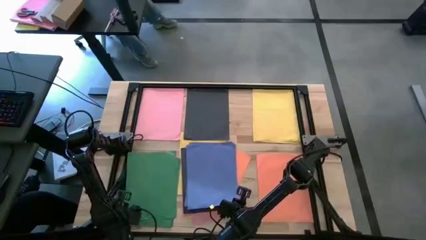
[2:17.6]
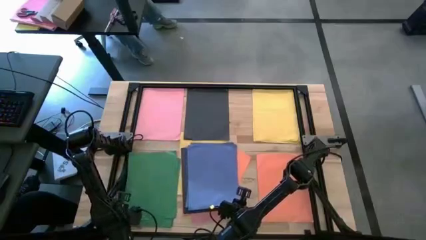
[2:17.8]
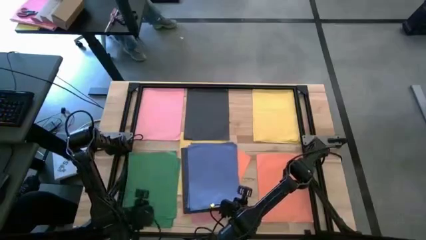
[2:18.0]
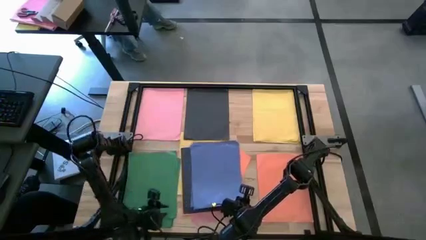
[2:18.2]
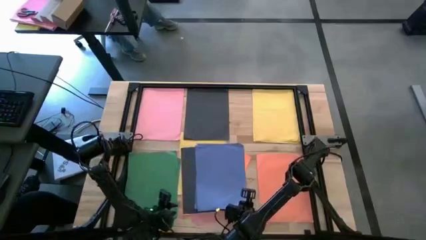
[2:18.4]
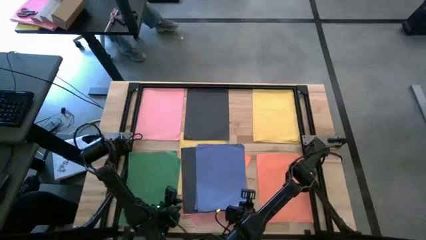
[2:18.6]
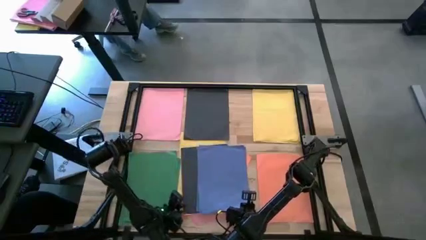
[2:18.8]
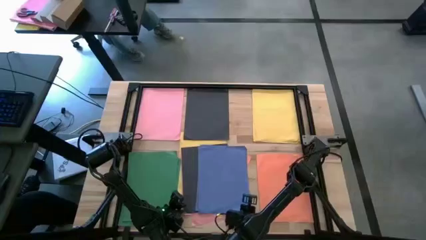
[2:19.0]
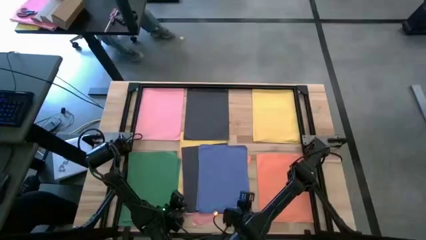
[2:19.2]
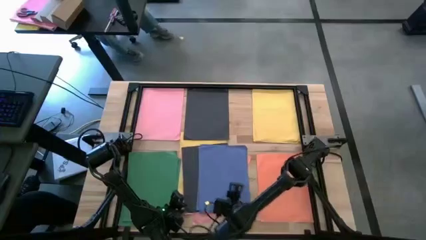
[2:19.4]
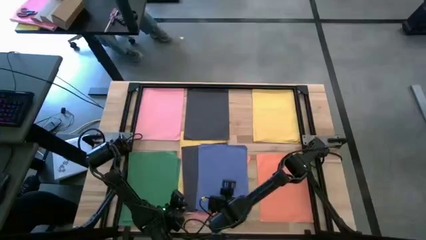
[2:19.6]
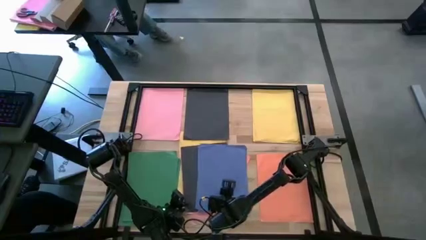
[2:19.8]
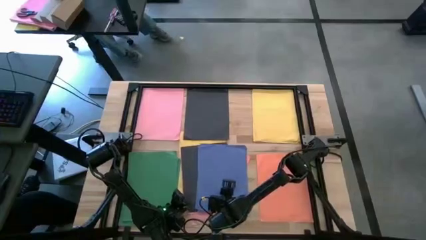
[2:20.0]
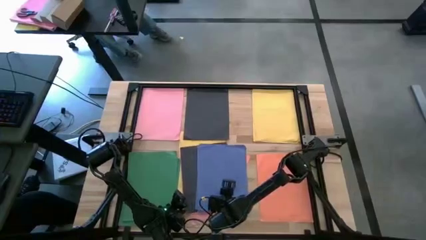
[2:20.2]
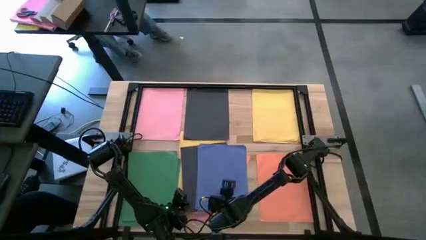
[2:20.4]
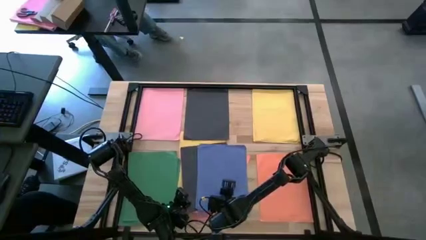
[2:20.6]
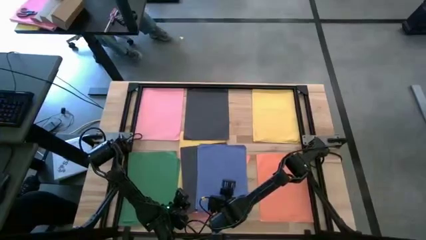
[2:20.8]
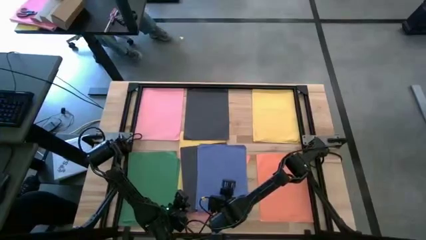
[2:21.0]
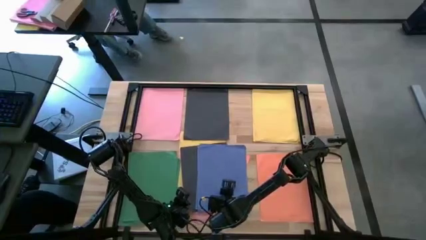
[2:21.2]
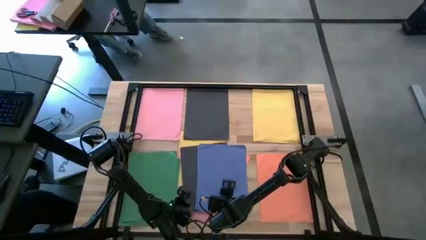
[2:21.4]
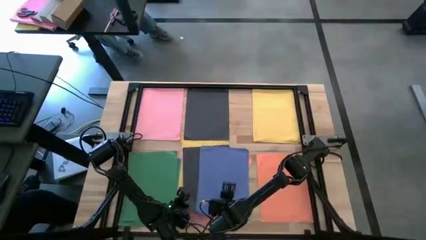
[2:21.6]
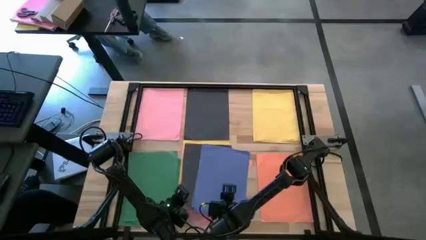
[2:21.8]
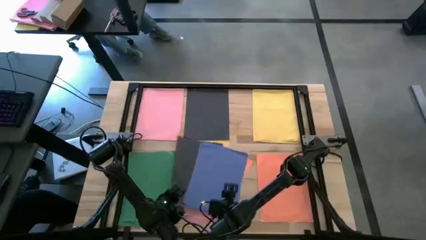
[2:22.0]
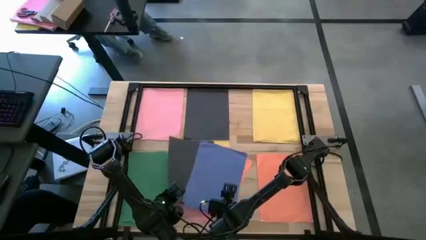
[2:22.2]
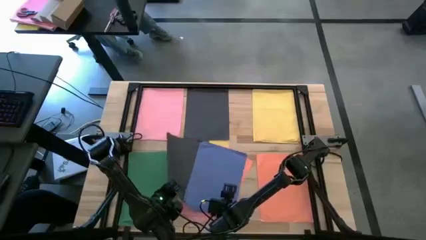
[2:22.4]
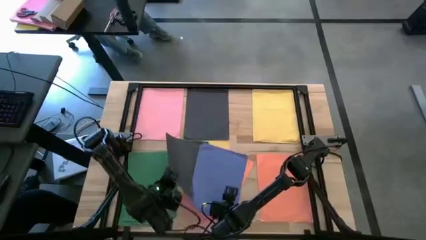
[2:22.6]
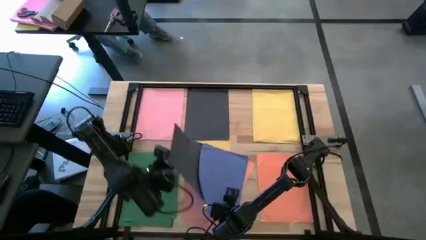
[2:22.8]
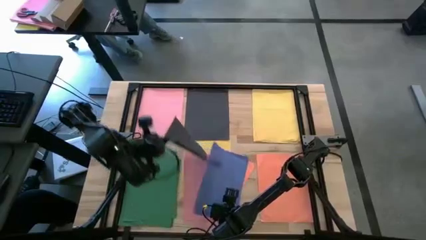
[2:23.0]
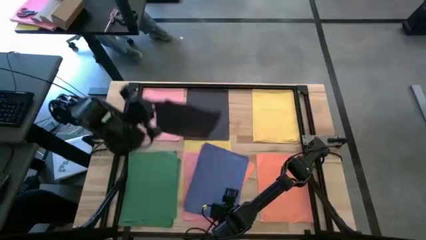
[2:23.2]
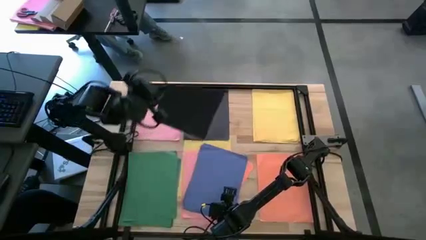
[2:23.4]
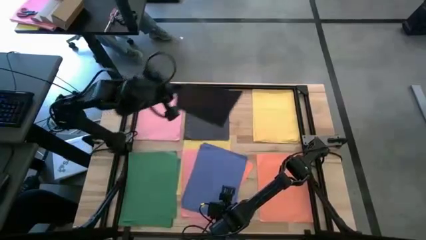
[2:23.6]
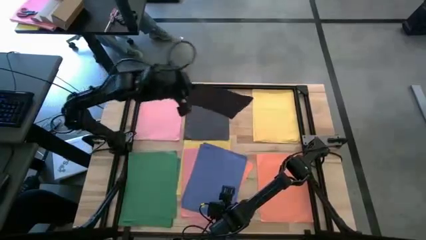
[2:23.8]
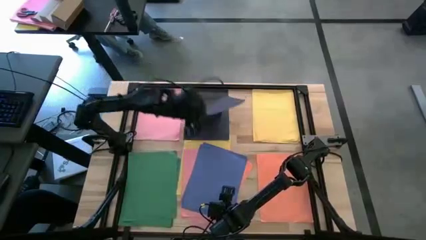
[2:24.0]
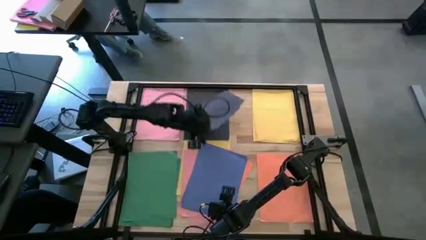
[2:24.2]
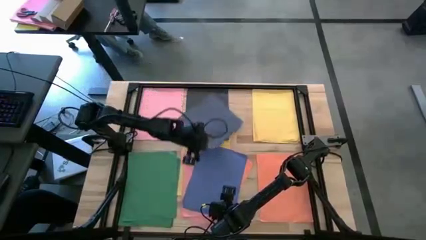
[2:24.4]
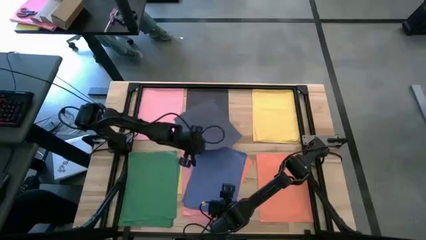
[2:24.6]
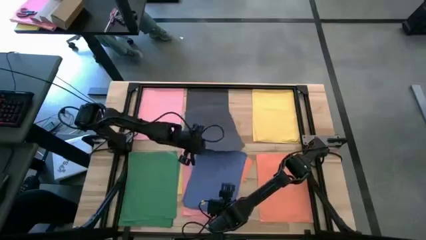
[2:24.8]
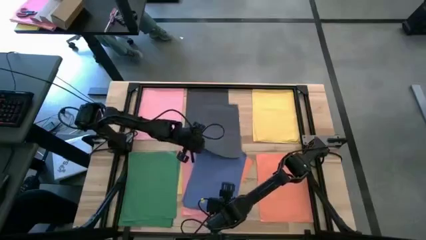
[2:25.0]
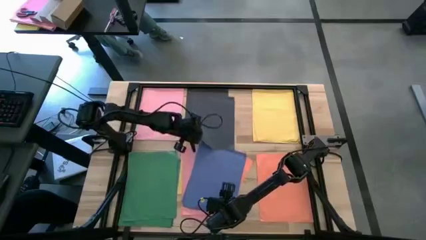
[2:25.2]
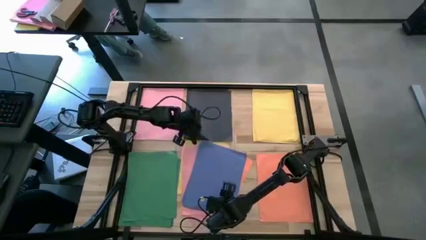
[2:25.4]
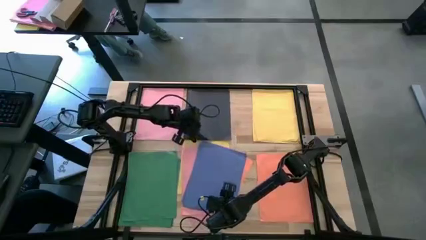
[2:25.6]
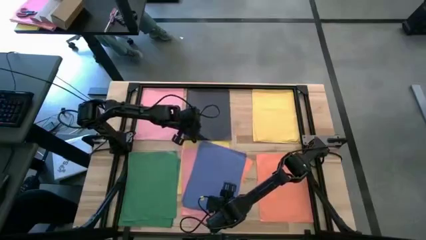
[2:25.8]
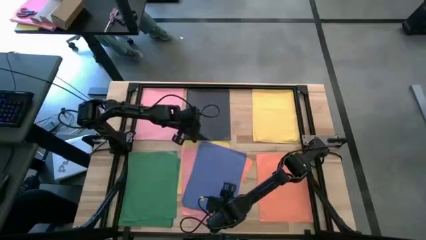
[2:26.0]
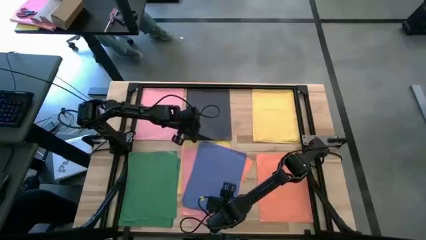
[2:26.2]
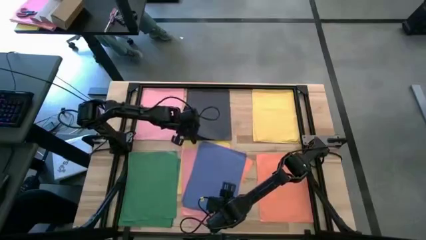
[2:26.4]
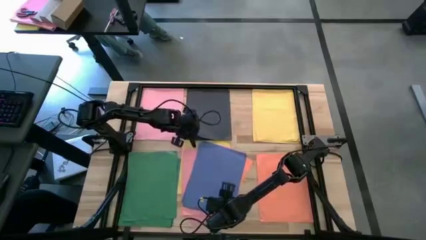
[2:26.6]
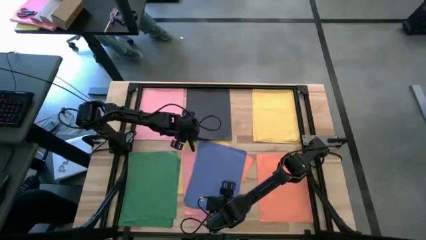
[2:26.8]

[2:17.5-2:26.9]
Task: Organize paper
Stack the black color paper on top of the other black color paper

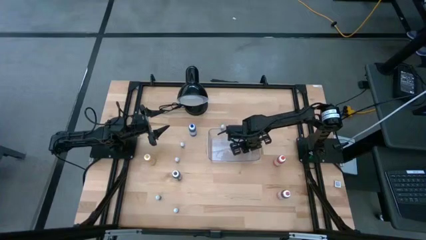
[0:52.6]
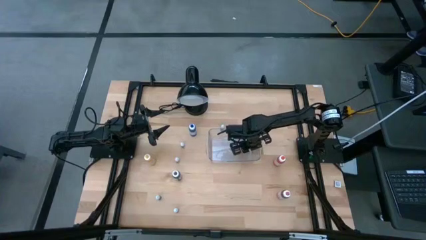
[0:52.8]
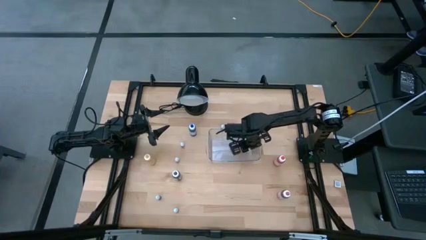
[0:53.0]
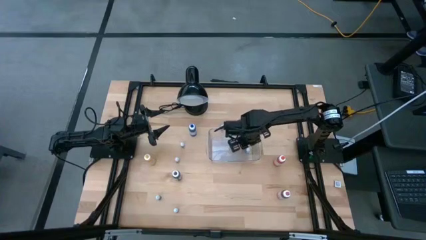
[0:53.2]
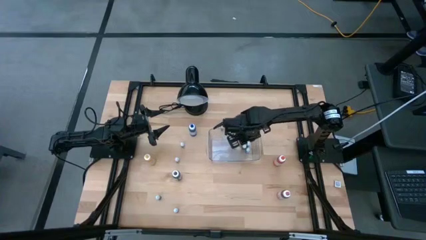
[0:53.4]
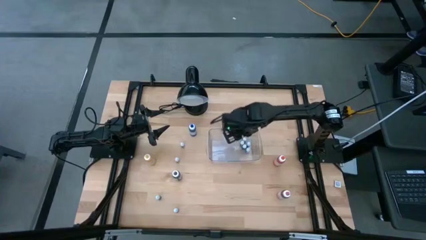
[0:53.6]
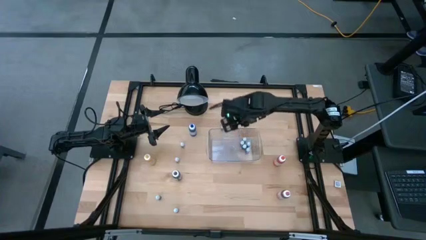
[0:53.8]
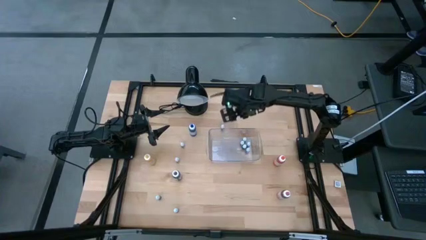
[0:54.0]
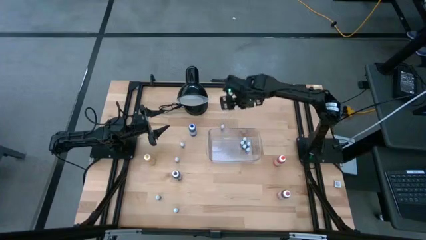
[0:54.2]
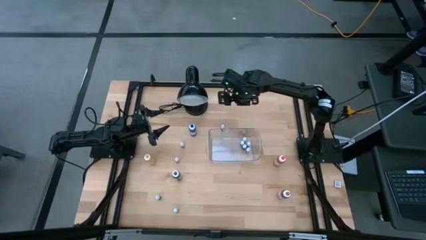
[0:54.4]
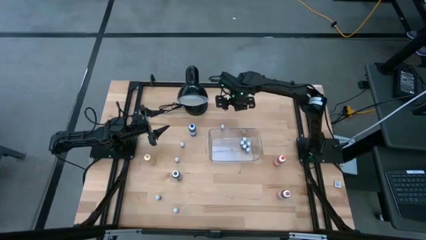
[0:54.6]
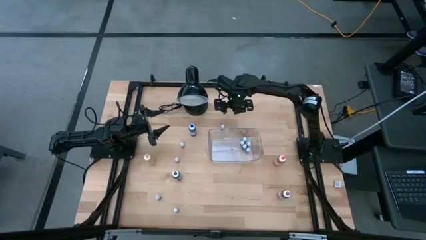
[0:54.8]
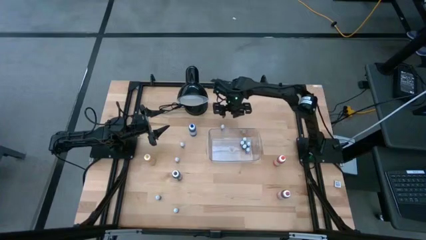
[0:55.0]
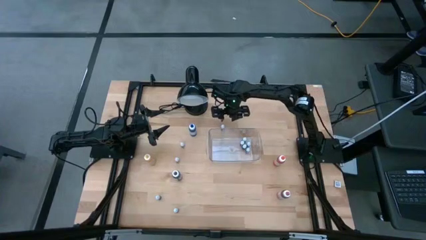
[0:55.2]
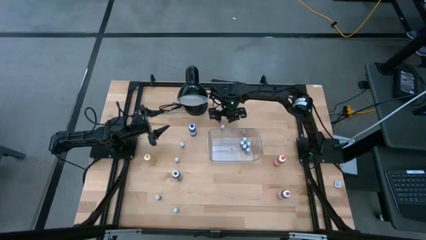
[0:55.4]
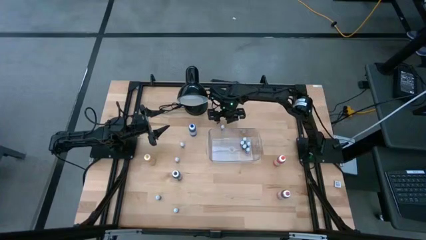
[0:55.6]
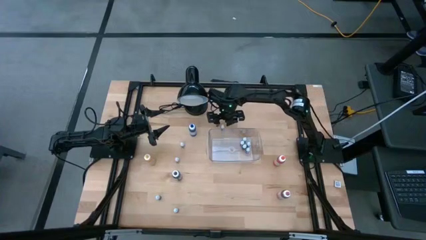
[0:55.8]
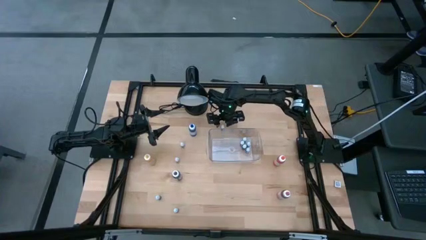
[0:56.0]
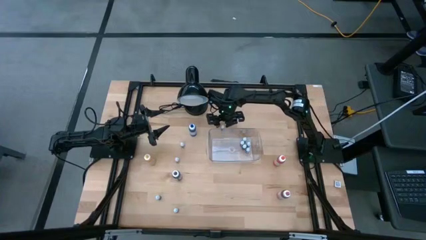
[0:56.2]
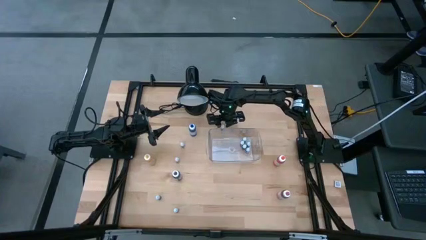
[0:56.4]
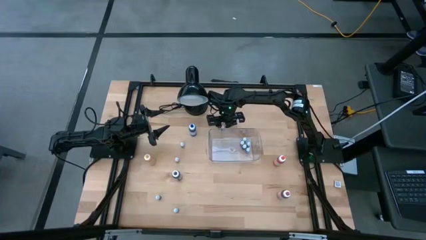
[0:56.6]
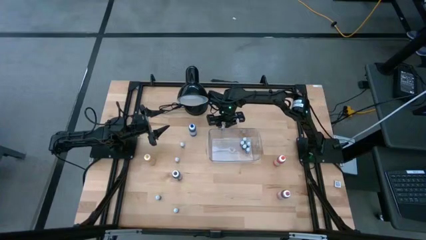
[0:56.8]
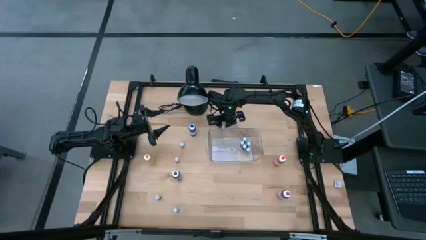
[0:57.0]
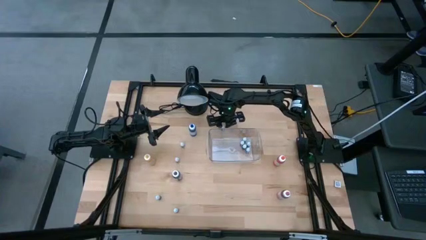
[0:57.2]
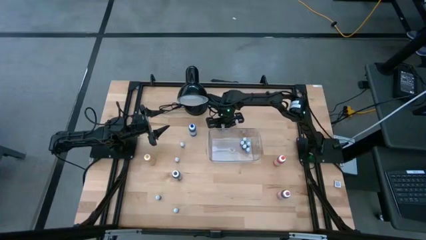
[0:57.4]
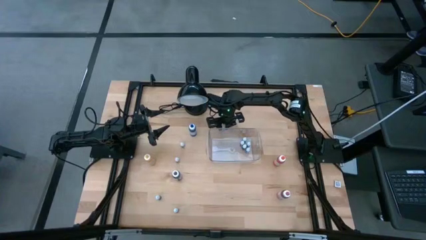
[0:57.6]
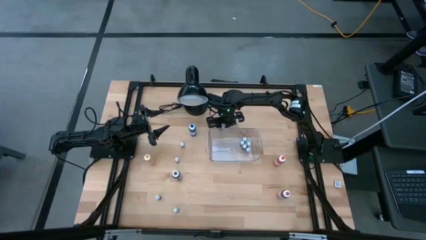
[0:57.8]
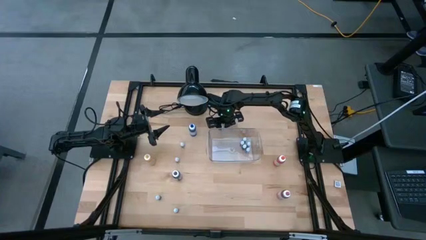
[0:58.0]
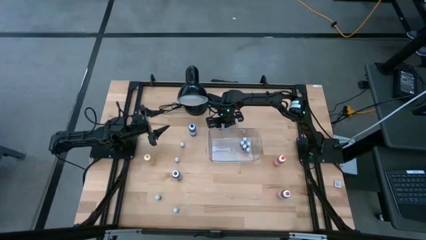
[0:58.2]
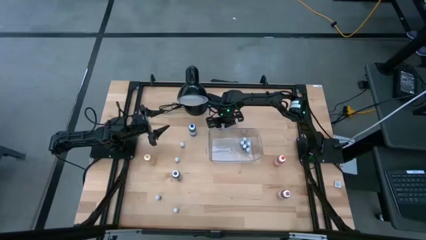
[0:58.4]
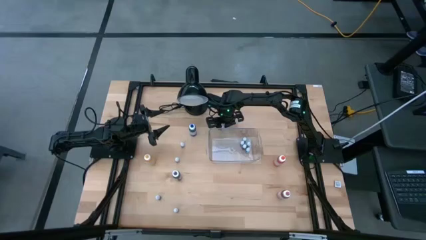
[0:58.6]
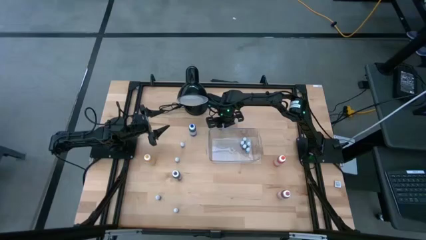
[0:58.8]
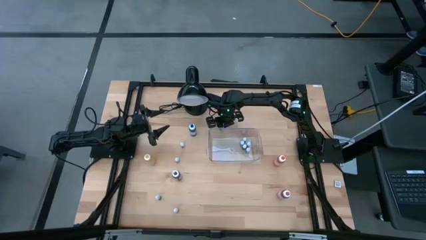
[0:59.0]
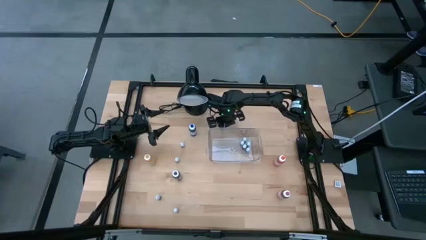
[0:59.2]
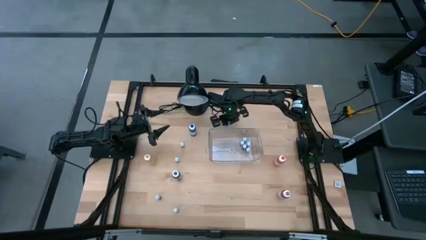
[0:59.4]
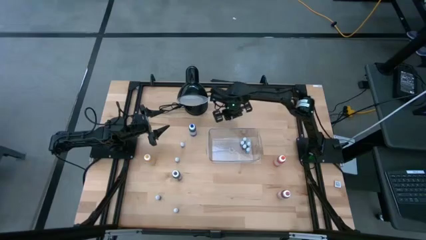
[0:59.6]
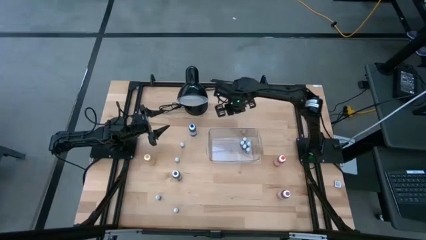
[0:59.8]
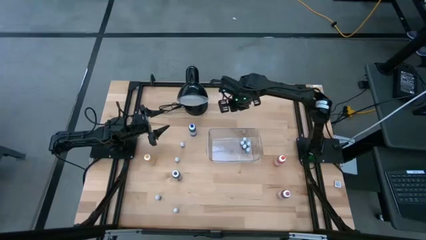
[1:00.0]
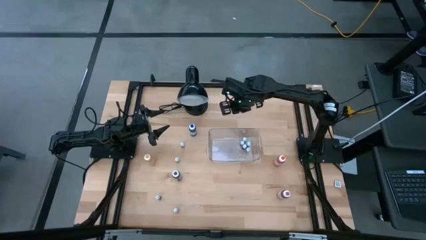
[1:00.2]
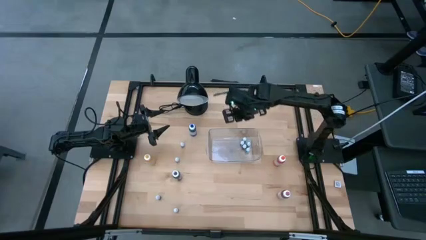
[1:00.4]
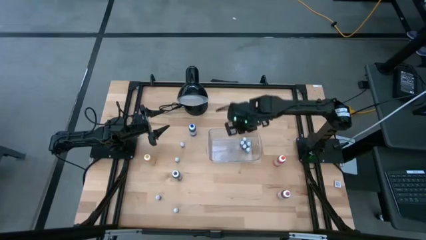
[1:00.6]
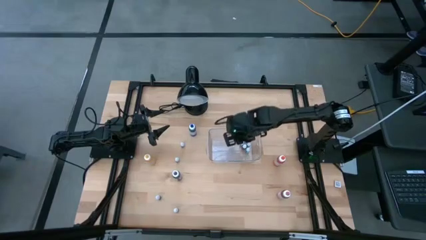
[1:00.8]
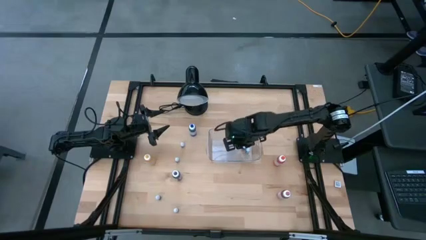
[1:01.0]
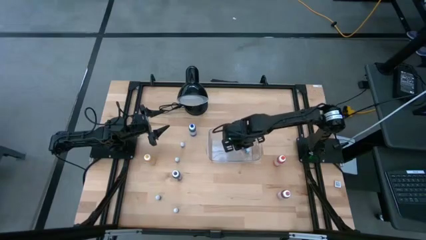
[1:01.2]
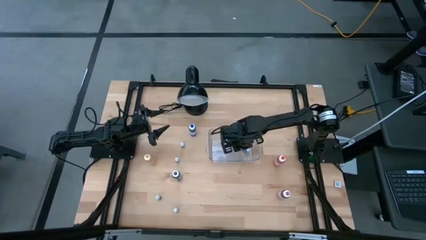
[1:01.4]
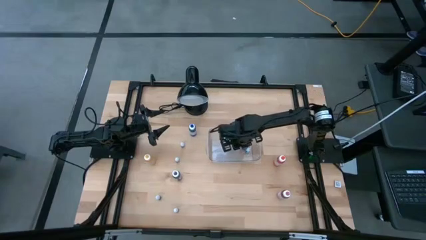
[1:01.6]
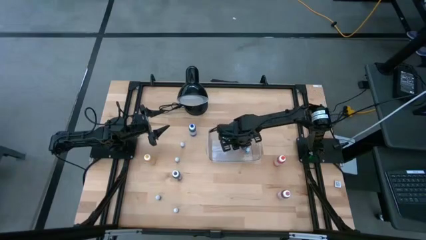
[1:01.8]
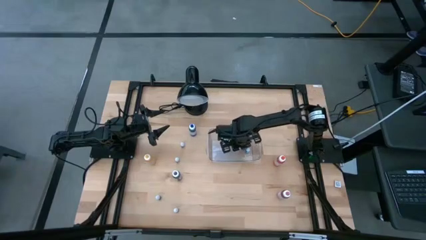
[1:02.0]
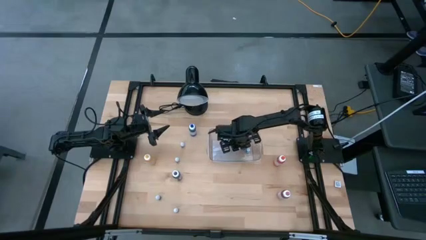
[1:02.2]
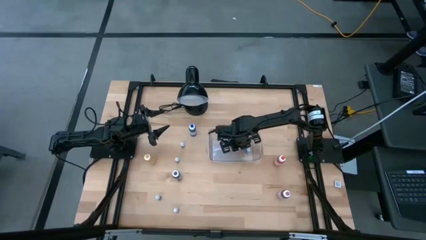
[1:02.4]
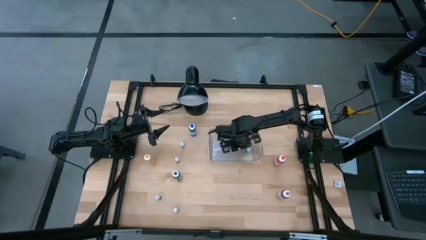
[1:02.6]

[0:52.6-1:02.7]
Task: Pick & Place food coloring
Put the small brown food coloring bottle into the transparent bin
